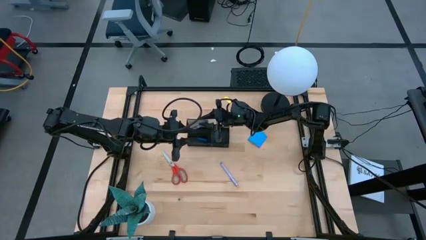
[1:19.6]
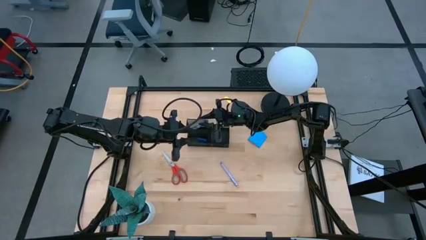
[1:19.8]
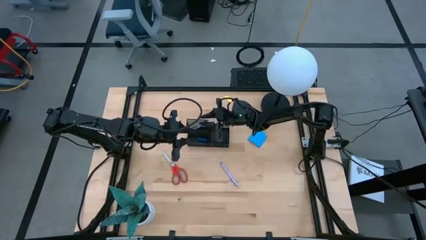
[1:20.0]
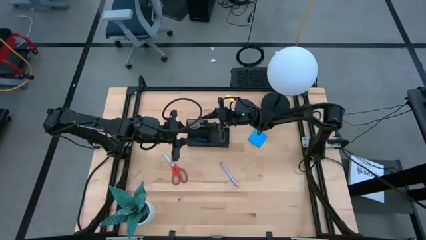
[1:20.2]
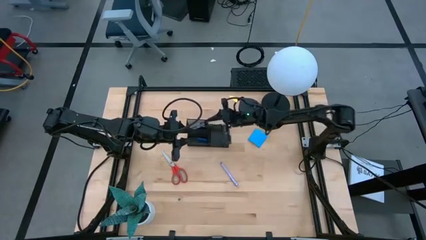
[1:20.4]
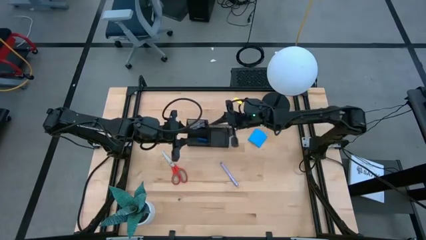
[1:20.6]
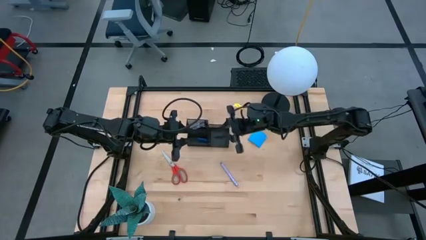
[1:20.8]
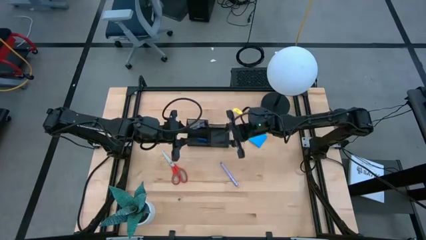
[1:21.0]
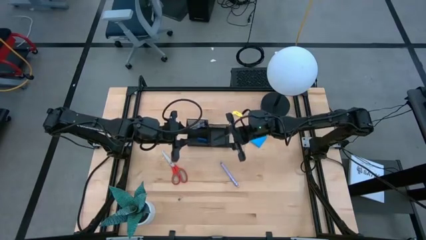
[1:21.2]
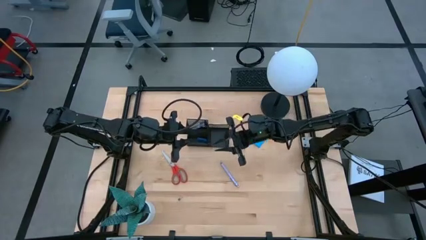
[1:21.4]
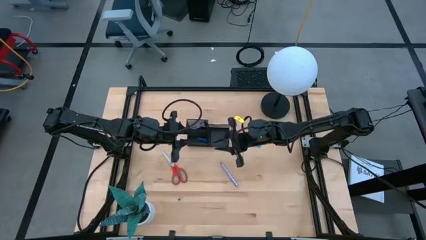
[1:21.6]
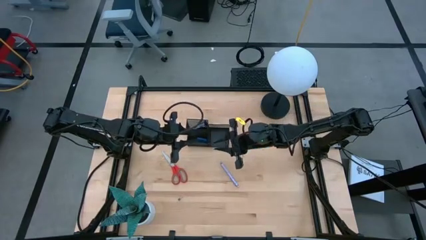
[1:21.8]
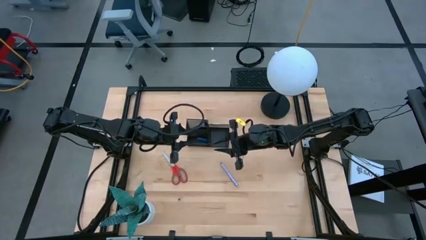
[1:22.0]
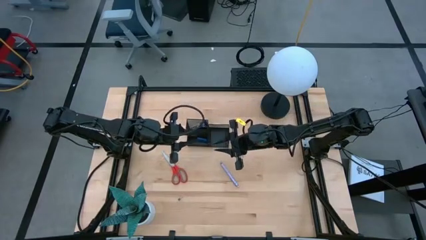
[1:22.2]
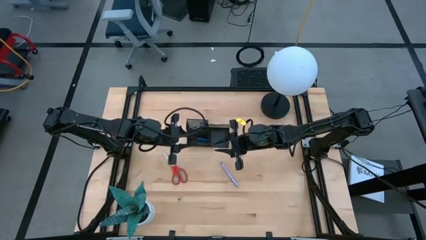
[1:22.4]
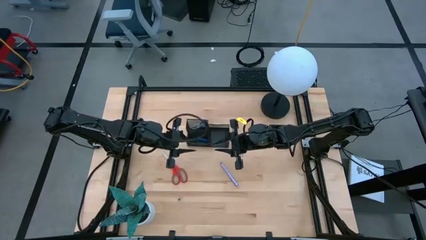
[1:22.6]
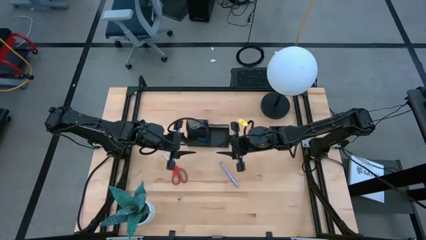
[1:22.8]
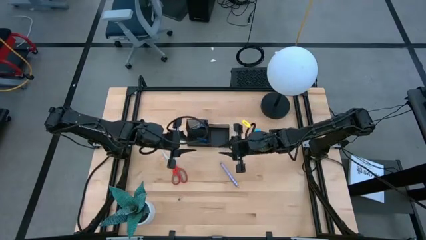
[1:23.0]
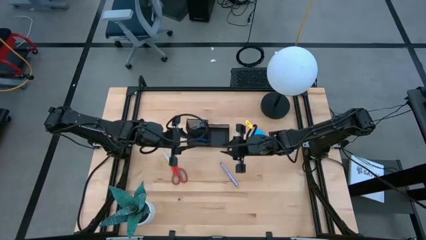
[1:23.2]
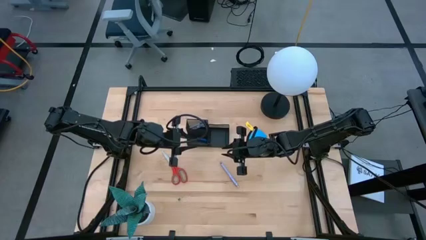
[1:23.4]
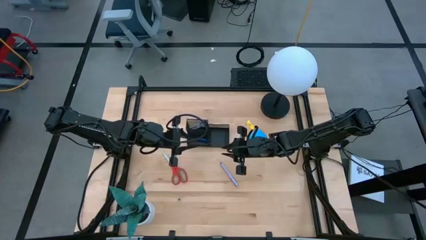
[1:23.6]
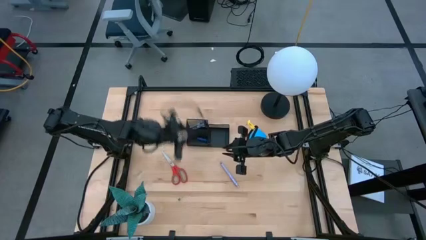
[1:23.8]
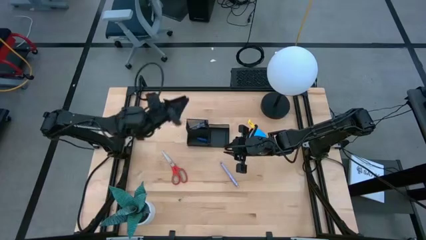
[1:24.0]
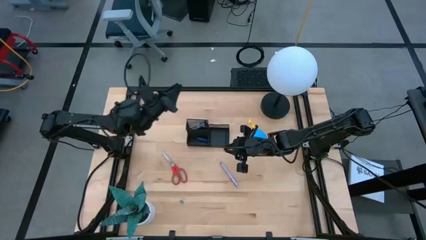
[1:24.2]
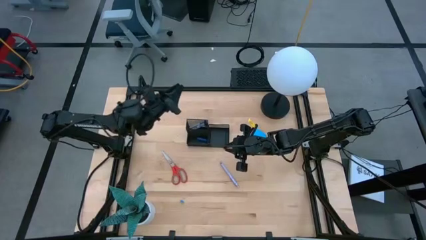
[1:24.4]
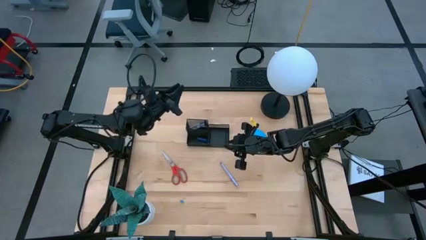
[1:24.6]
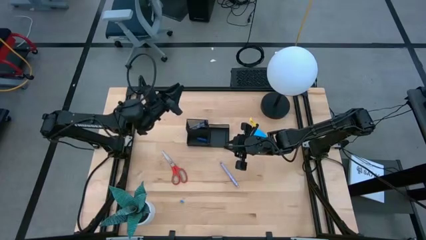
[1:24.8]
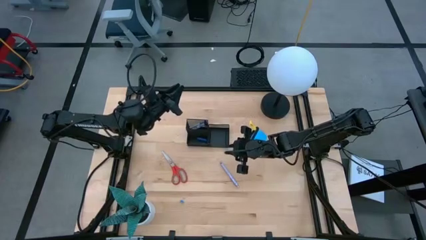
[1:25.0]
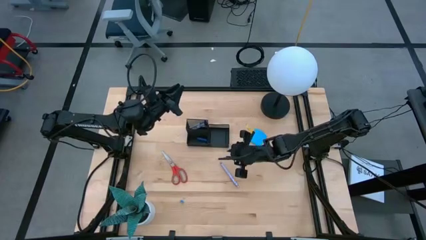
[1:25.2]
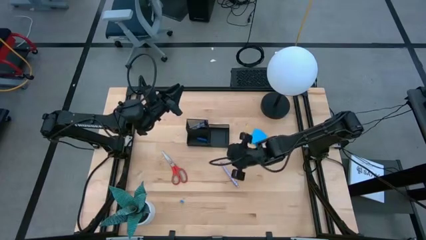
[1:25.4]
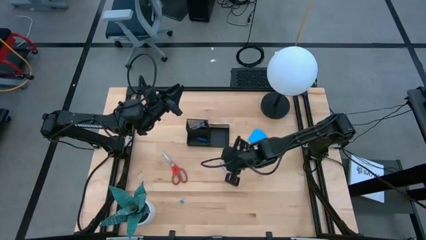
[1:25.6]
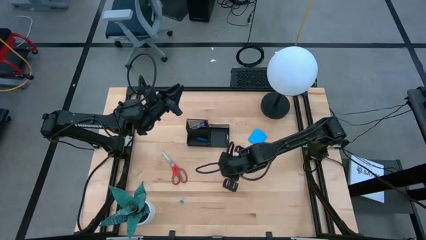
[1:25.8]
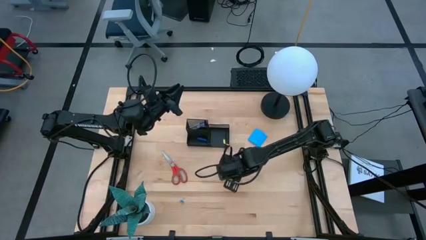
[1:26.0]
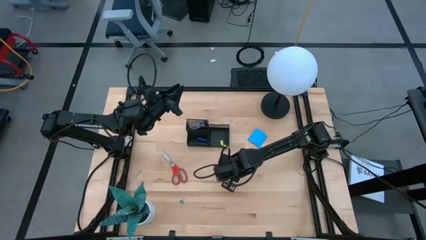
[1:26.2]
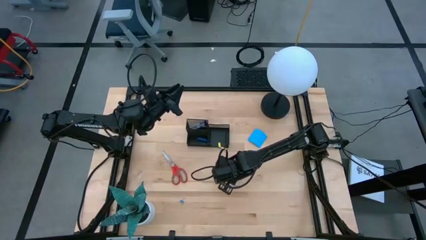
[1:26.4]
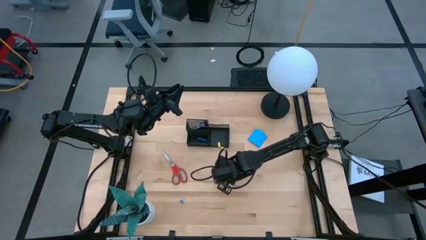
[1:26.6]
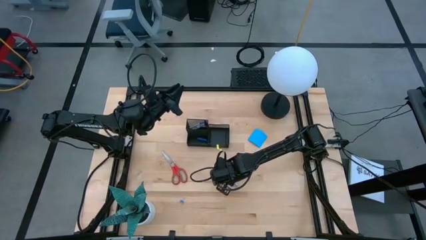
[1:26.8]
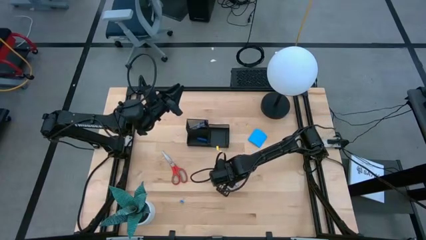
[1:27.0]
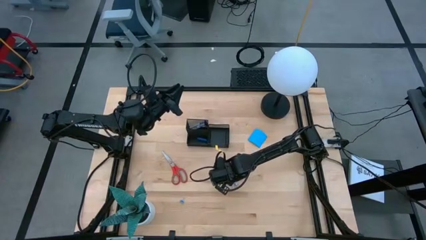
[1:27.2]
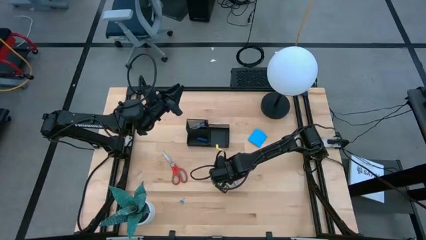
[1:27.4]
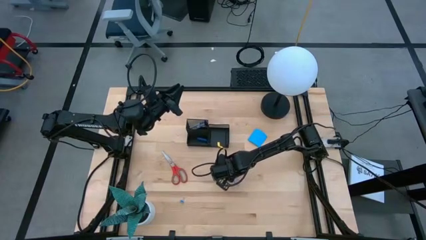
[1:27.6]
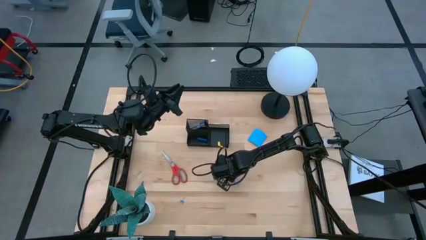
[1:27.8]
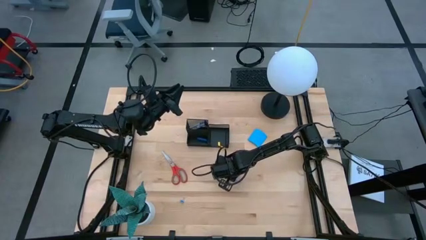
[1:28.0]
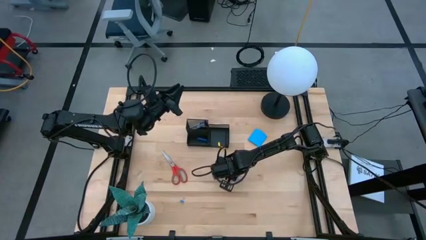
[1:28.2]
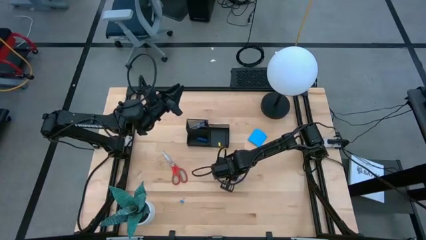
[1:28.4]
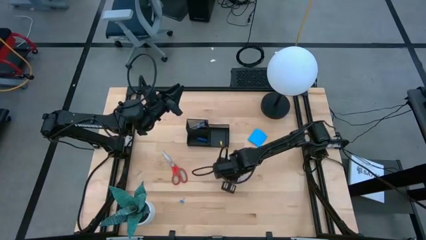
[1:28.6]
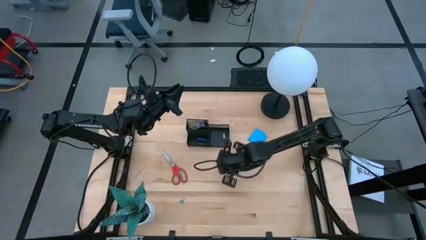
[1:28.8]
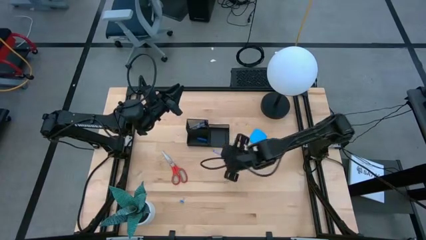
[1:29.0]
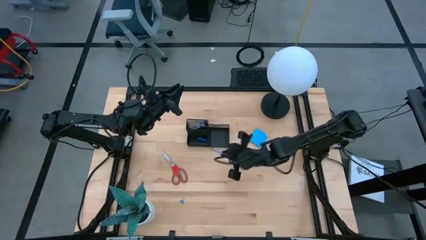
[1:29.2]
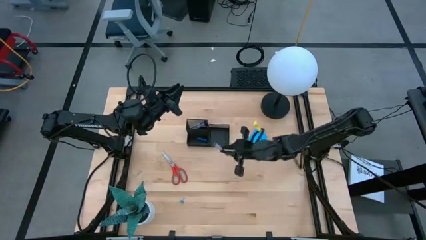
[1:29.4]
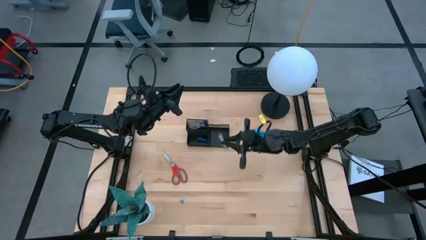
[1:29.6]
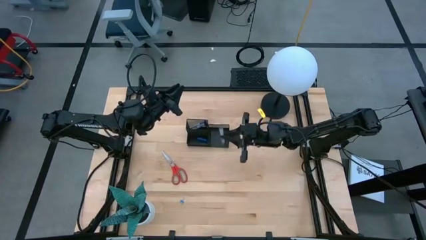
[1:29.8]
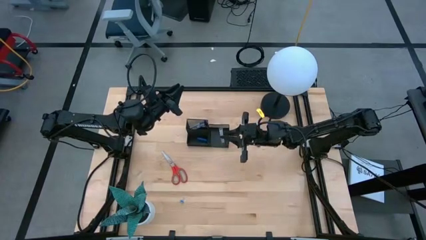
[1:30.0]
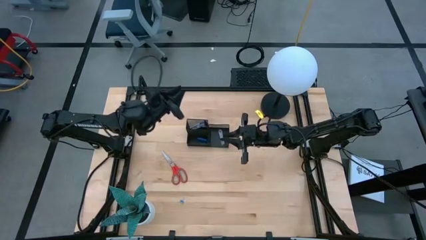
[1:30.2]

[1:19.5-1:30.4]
Task: Pick and place office supplies into organizer
Put the white pen into the desk organizer

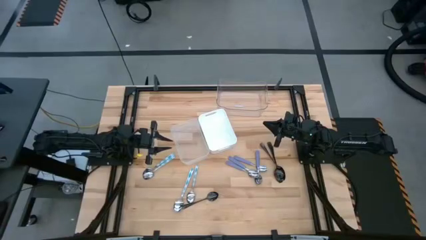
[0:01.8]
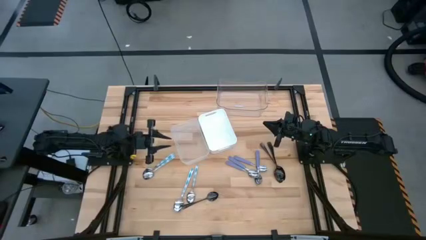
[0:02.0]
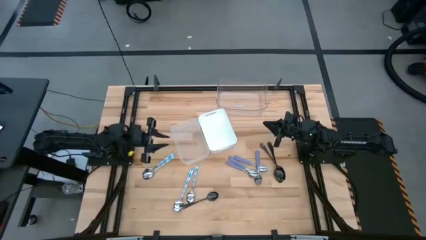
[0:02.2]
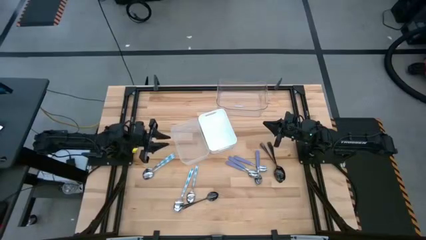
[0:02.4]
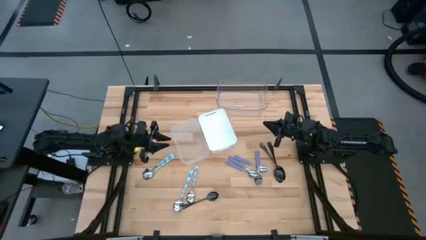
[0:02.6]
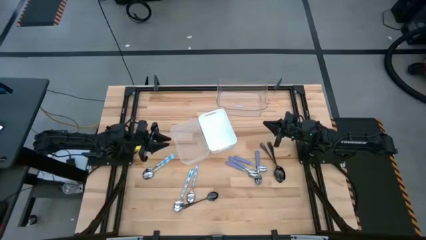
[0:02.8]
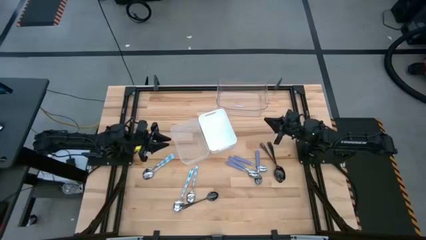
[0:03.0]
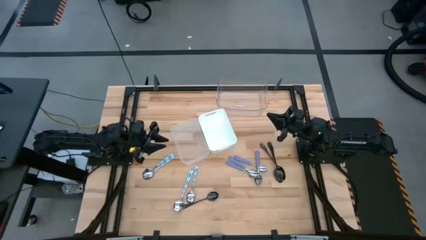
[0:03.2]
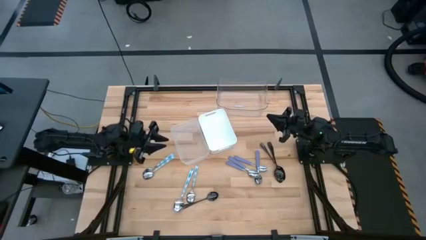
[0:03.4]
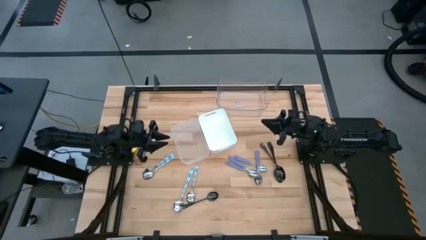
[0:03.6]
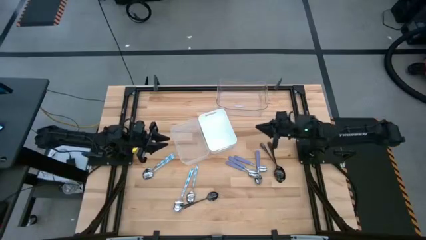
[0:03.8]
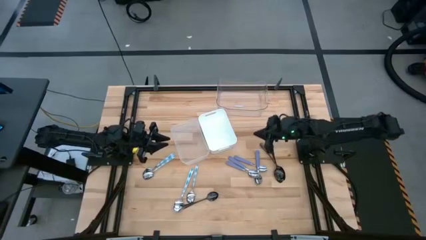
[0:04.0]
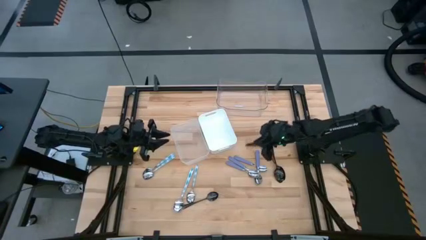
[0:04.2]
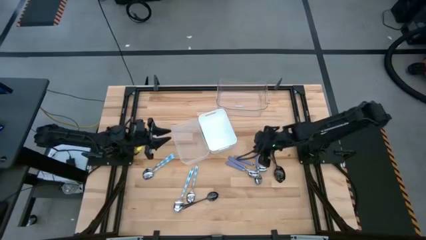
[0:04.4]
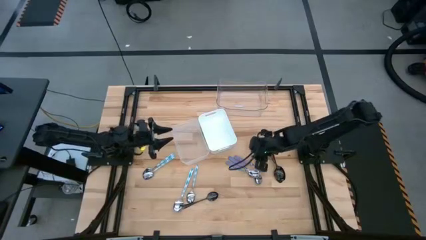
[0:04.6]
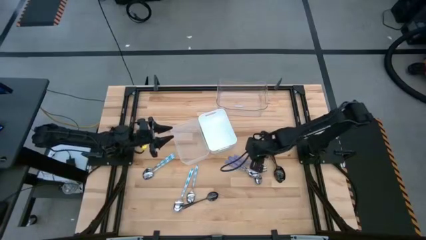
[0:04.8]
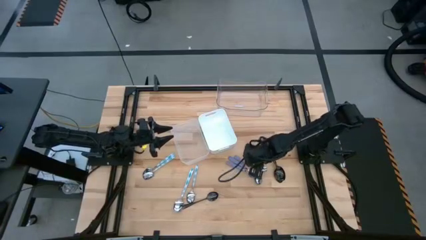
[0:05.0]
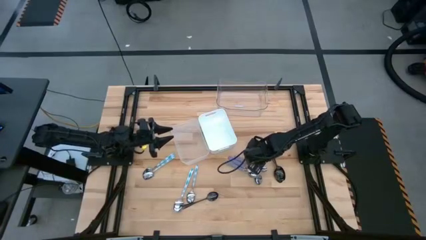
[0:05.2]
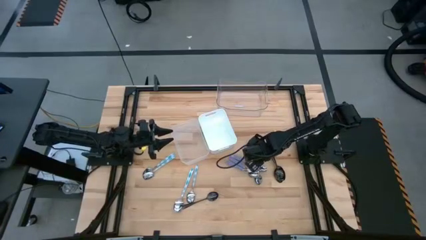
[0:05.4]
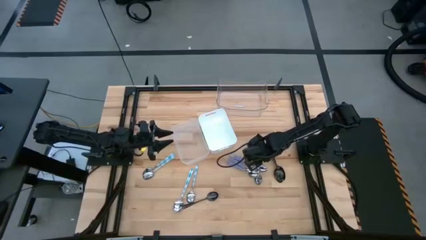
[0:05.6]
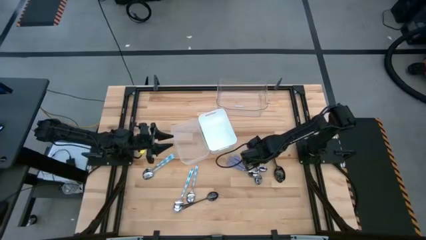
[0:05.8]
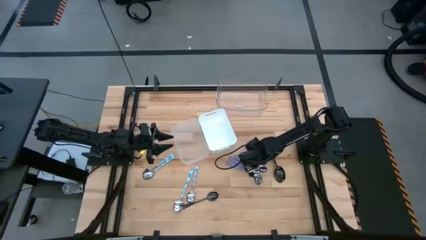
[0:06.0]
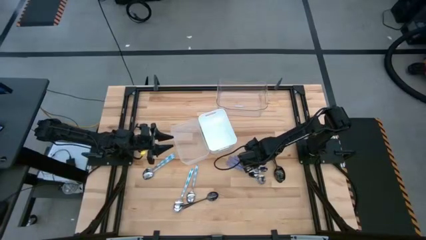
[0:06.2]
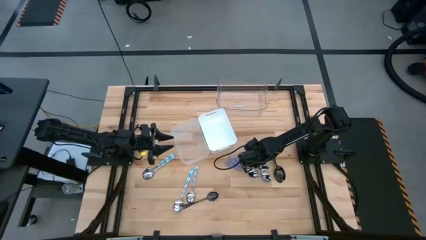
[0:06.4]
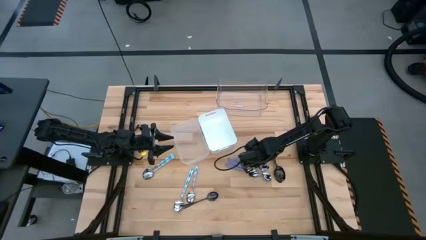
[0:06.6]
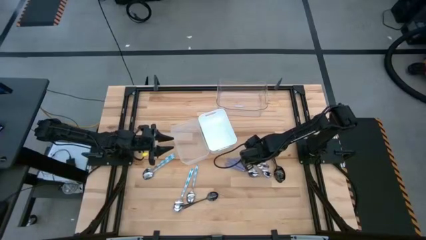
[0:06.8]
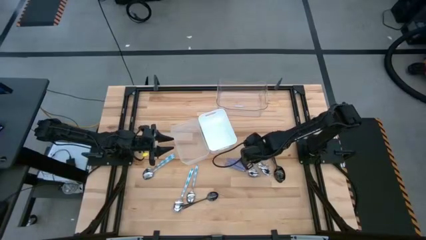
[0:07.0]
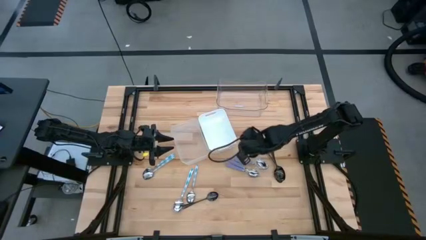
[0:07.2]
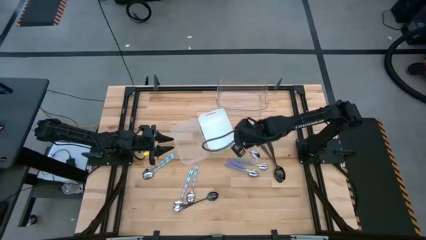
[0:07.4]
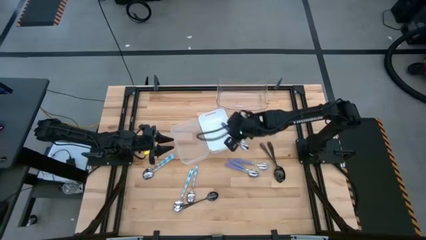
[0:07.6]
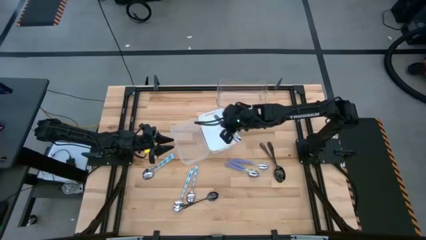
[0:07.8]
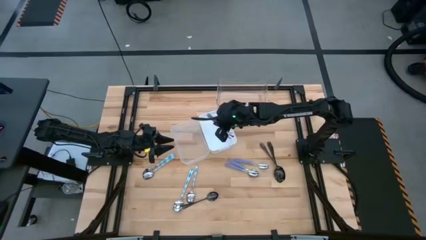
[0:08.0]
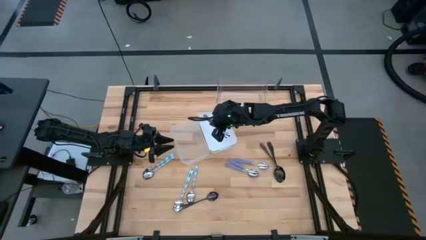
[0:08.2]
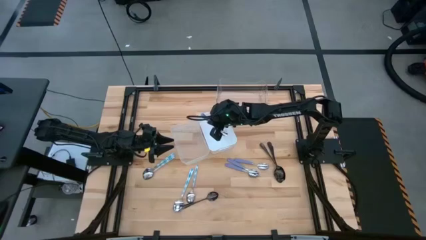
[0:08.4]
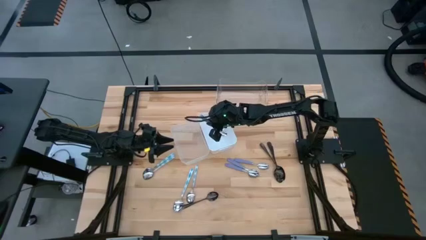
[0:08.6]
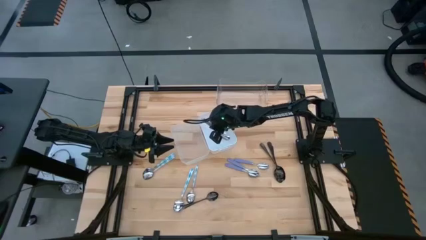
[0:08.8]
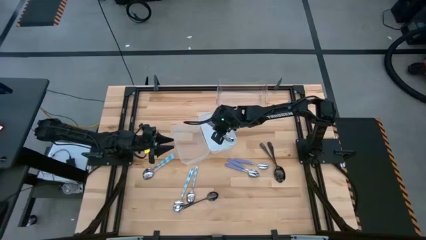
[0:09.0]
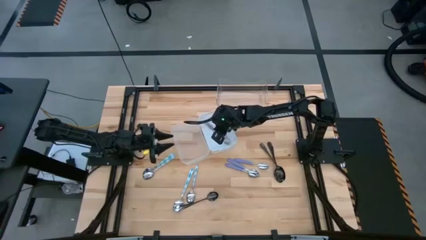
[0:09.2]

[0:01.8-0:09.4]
Task: Sort silverware by color (type)
Put the purple spoon into the white bin
